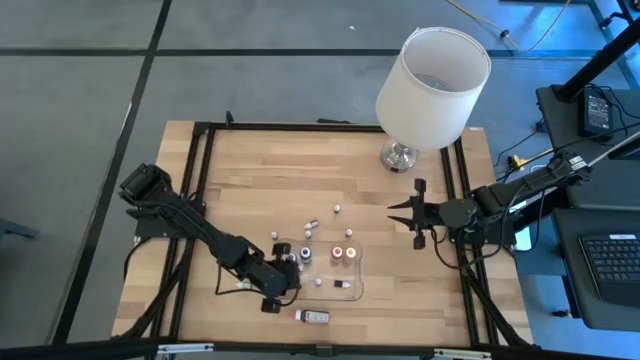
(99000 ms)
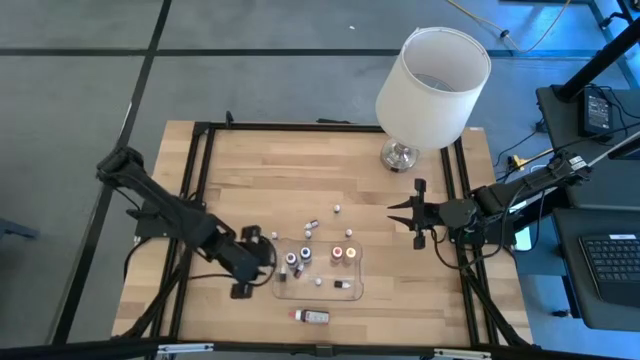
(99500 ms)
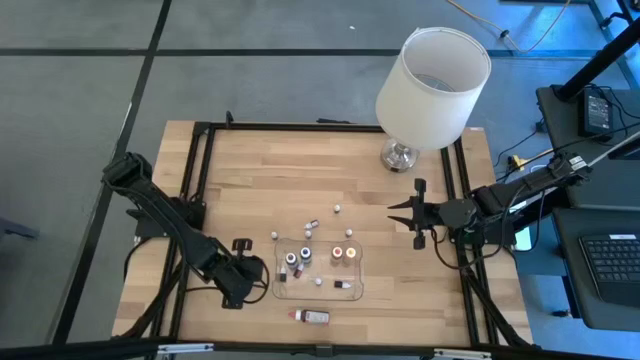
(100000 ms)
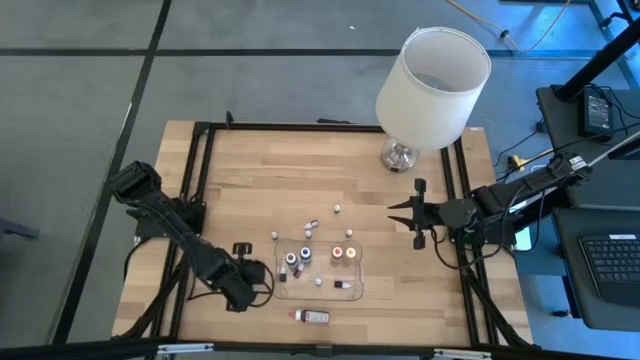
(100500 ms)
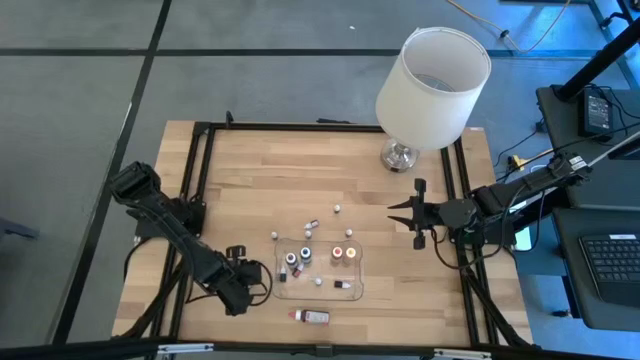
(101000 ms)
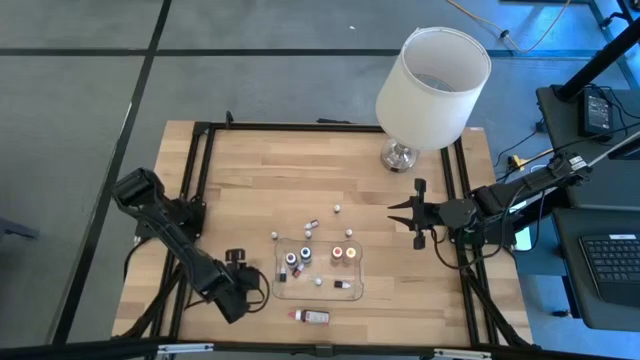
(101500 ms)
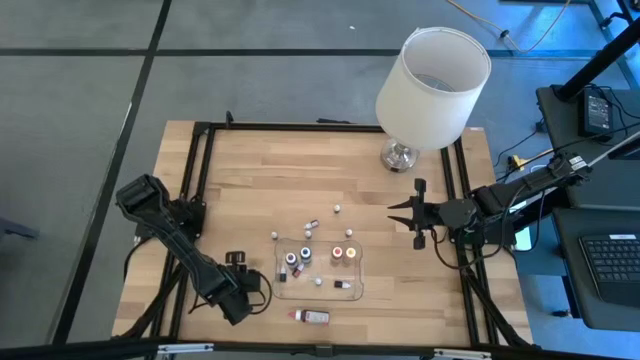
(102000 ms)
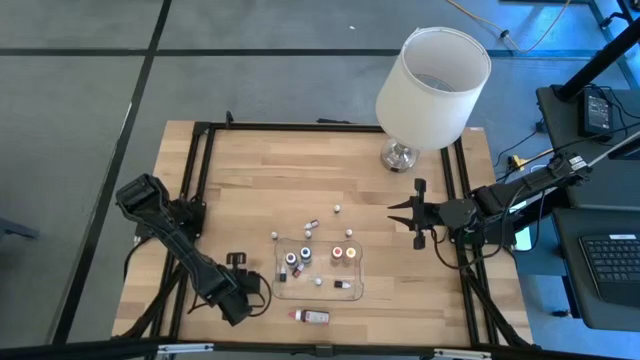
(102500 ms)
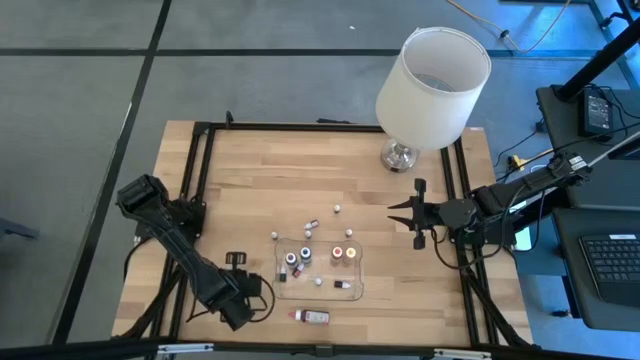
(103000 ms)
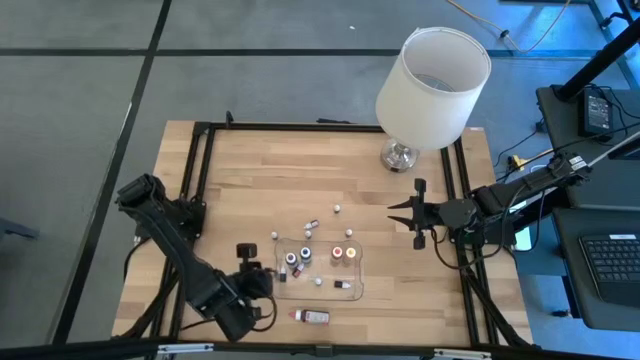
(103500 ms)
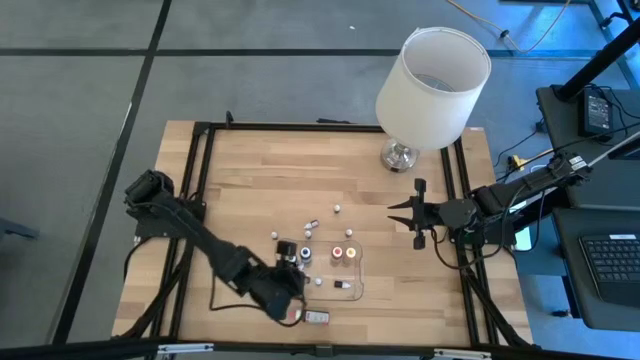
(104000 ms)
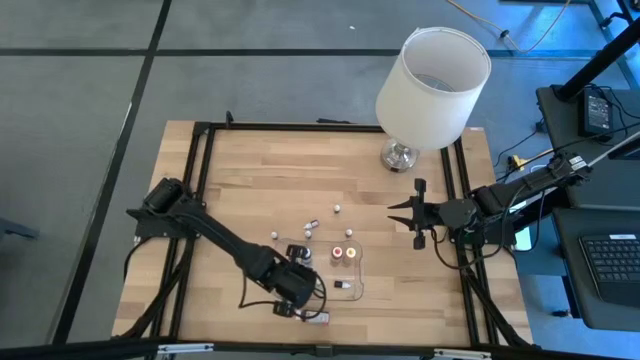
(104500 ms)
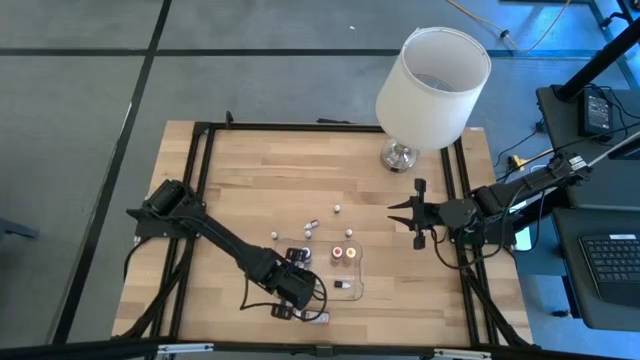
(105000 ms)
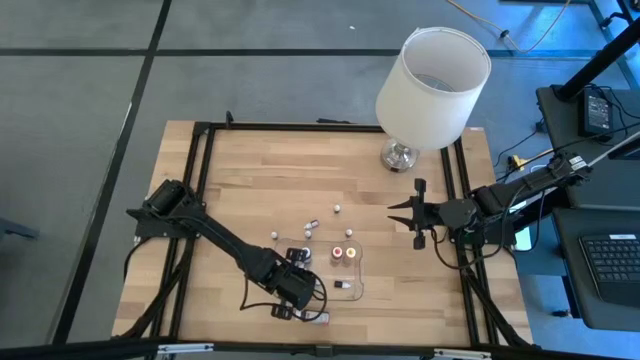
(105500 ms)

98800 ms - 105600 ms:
Task: Pick & Place food coloring
Put the small blue food coloring bottle into the container

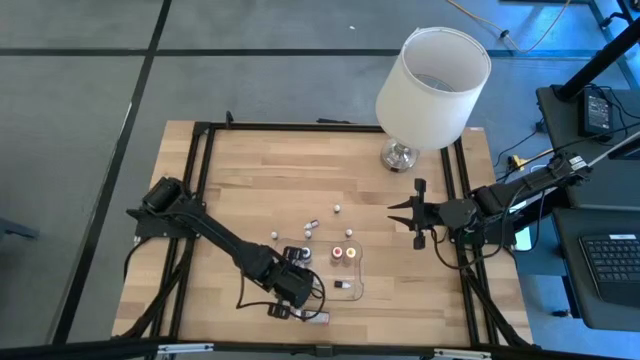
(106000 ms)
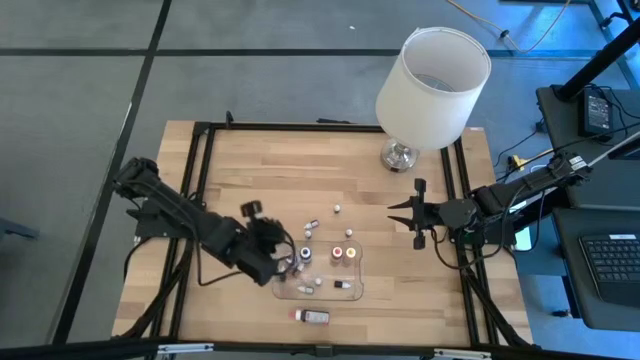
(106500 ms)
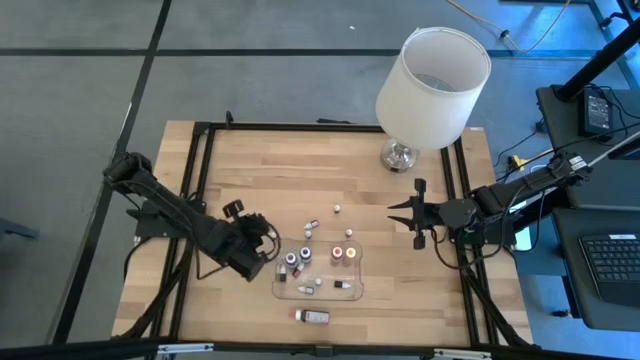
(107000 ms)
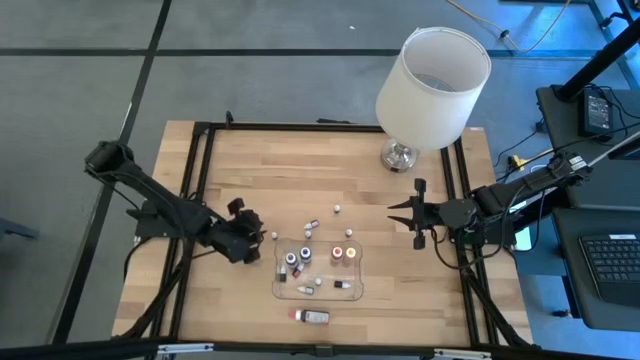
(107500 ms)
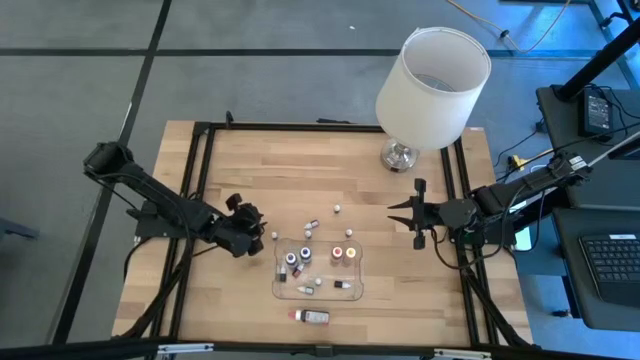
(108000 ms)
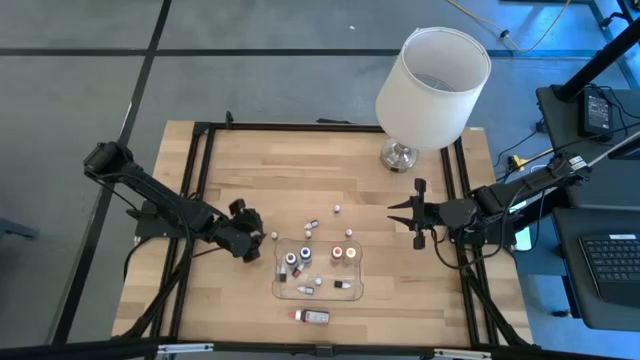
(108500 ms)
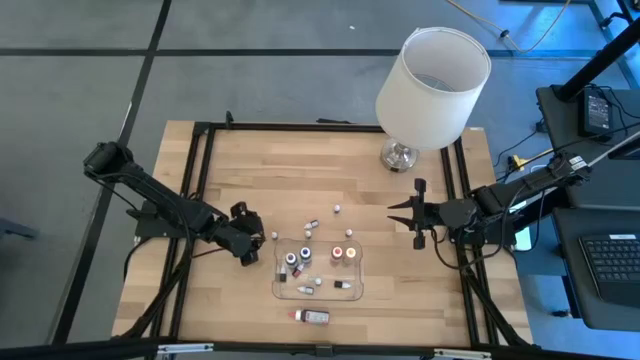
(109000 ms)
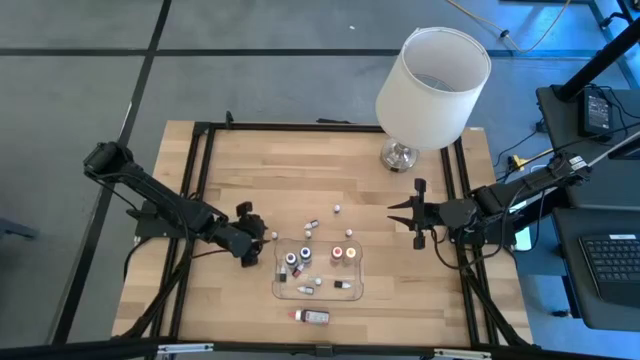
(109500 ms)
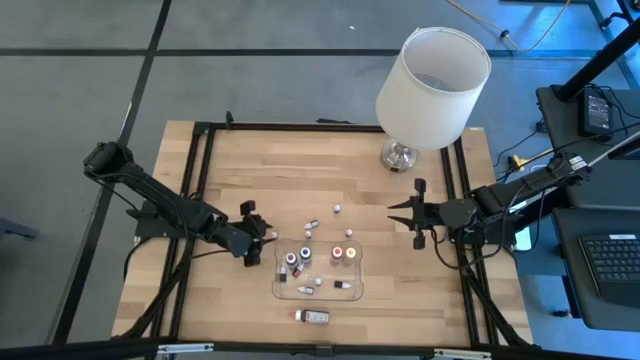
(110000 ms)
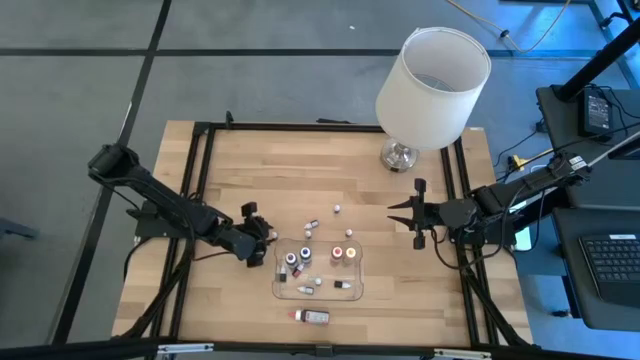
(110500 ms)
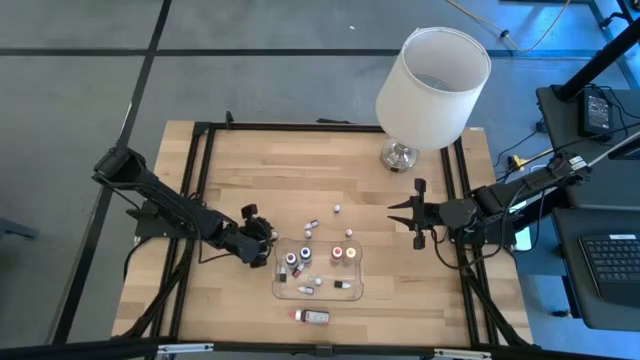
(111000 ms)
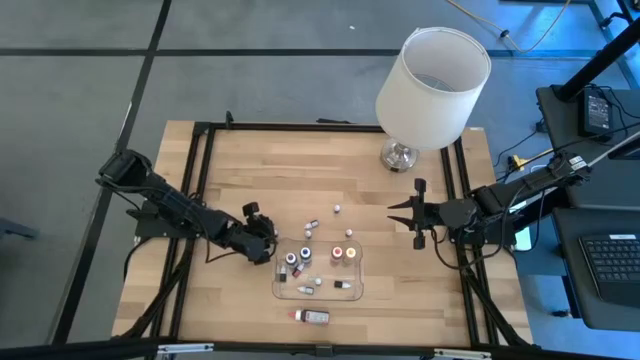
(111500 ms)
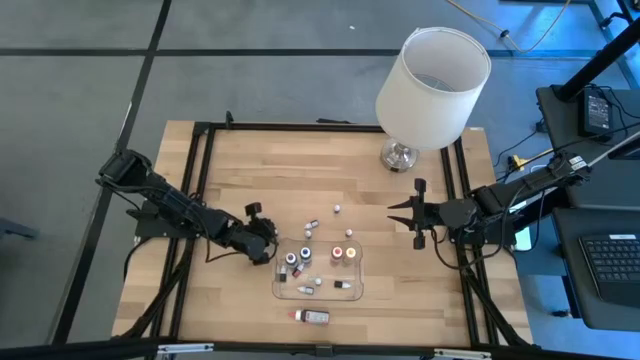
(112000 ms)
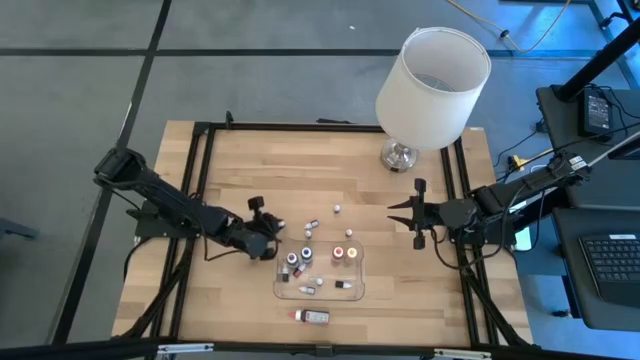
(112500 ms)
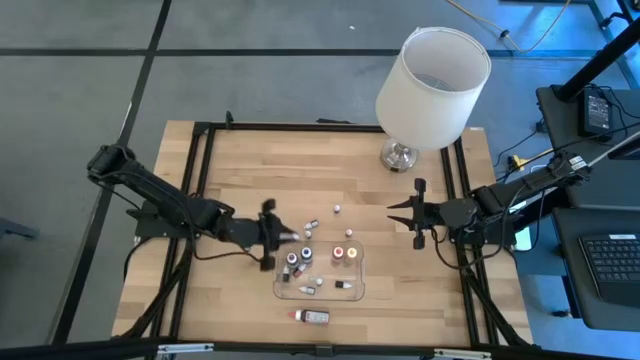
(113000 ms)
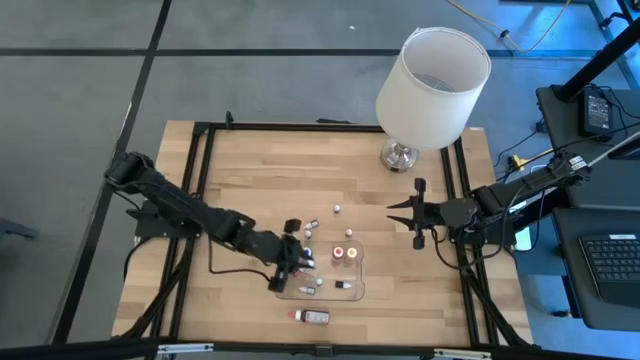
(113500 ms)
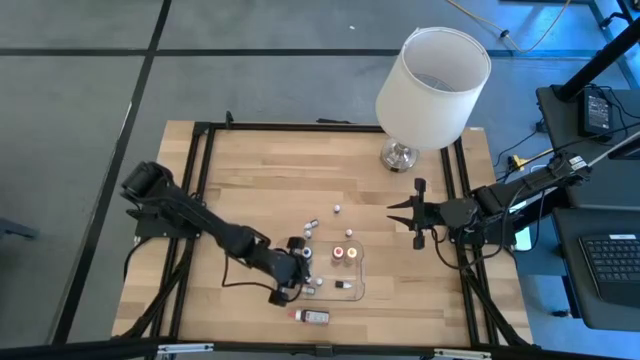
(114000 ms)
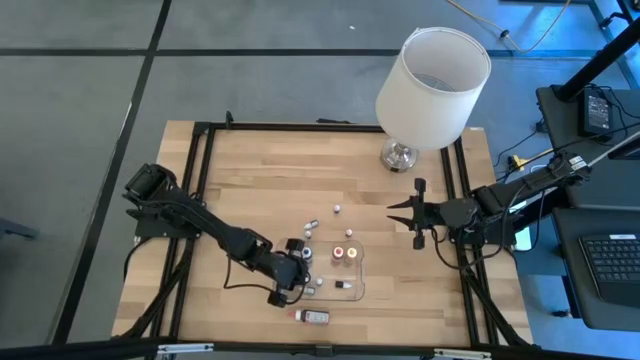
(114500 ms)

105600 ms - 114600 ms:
Put the small green food coloring bottle into the container

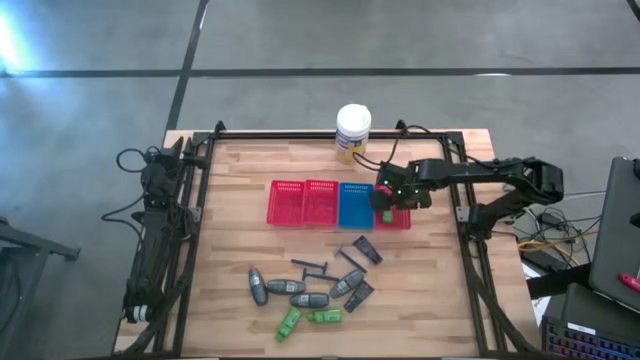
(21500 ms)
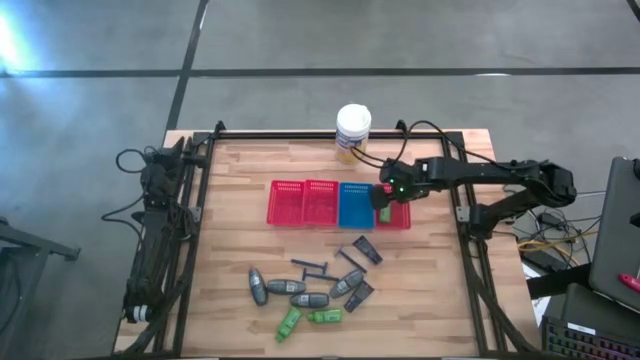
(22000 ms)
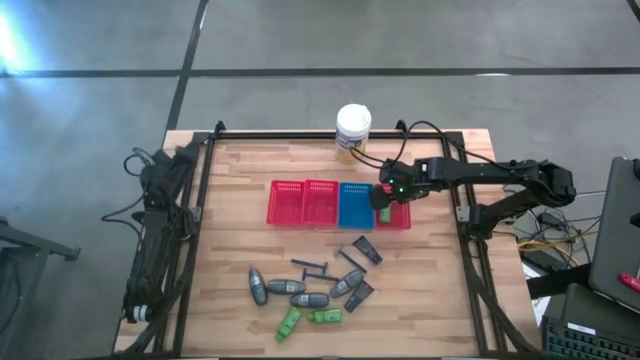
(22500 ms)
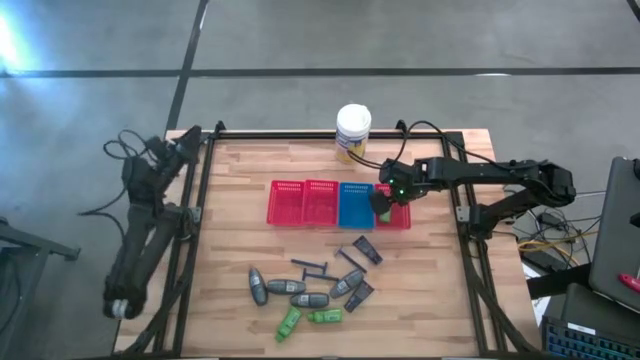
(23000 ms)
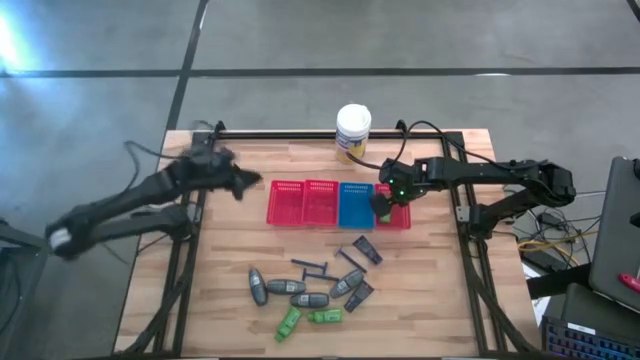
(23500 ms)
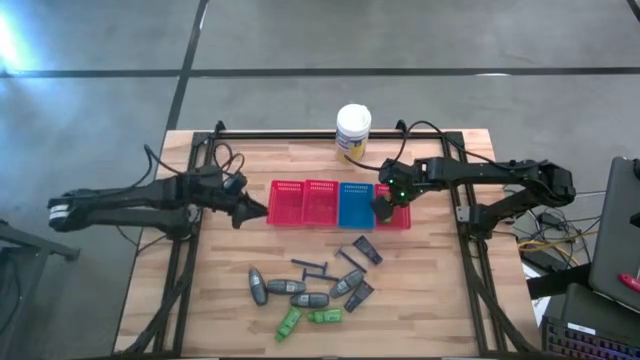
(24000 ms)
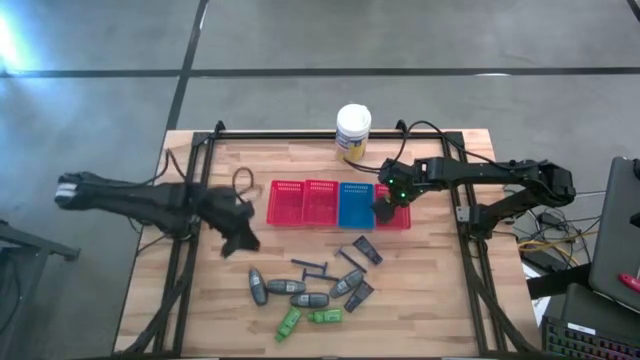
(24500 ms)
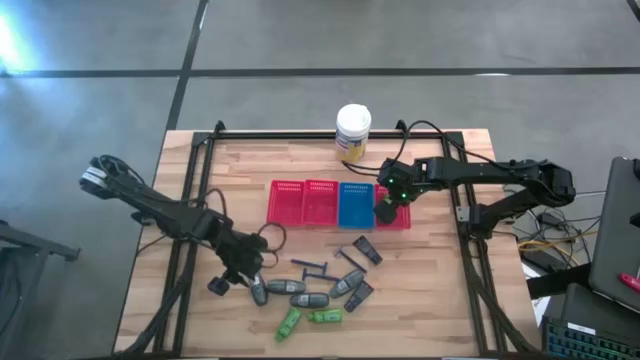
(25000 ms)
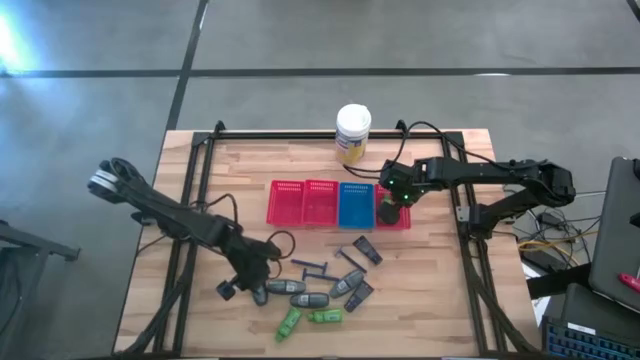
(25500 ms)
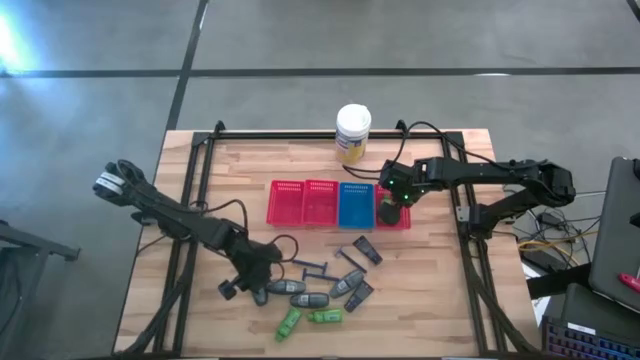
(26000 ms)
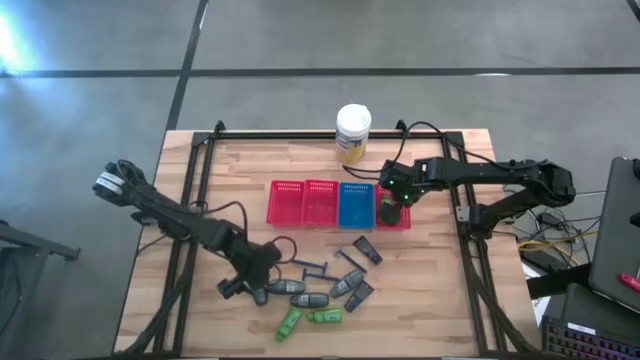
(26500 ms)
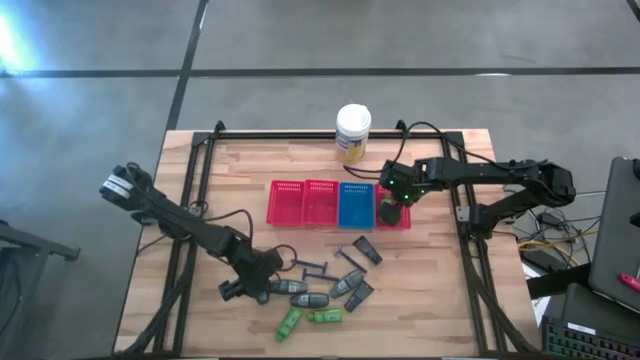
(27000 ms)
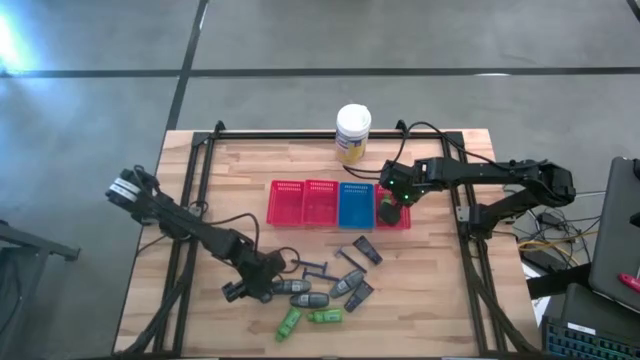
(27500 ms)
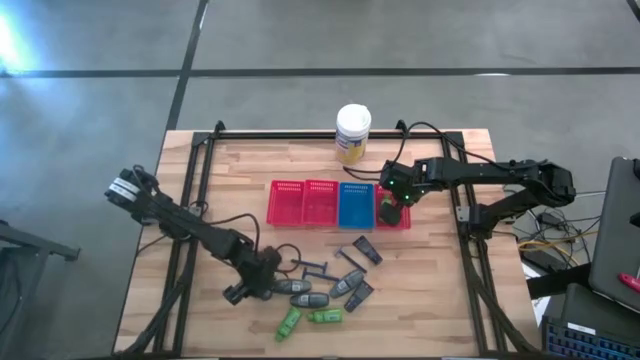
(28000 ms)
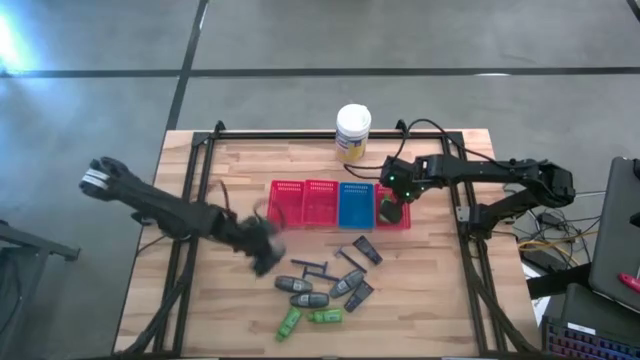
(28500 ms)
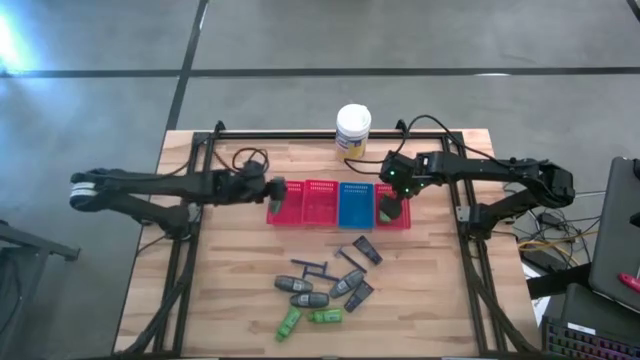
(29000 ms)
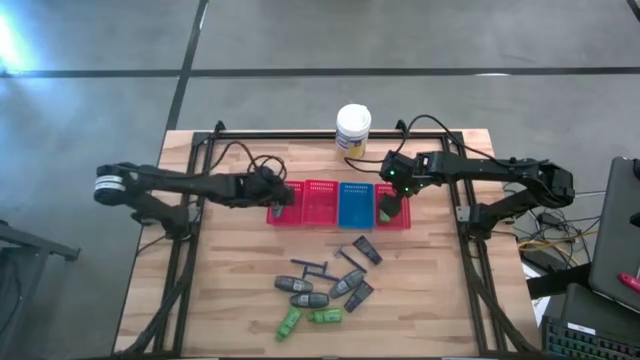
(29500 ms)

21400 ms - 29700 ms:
Task: Pick & Place Travel size toiletries
Put the black deodorant into the left red bin
